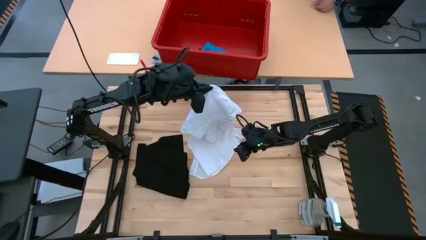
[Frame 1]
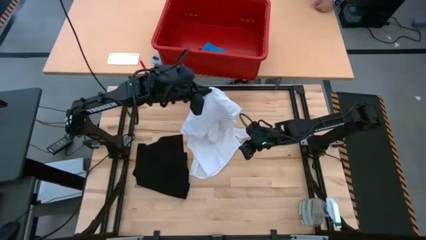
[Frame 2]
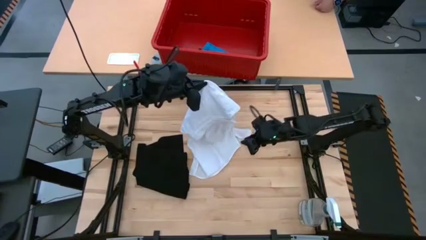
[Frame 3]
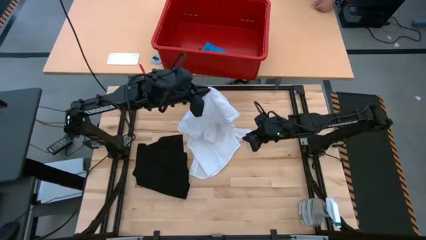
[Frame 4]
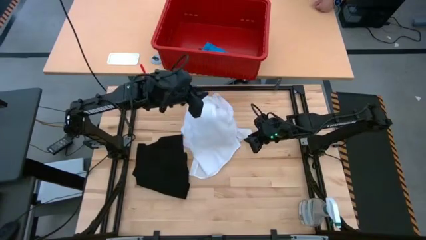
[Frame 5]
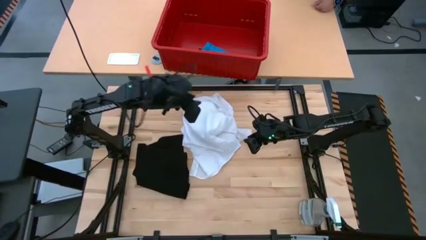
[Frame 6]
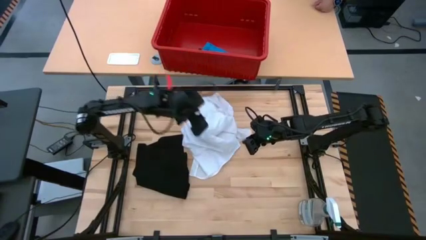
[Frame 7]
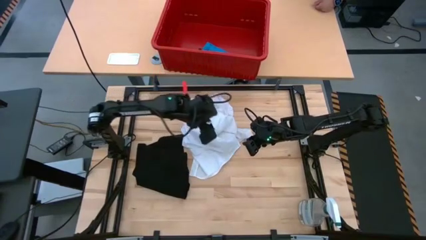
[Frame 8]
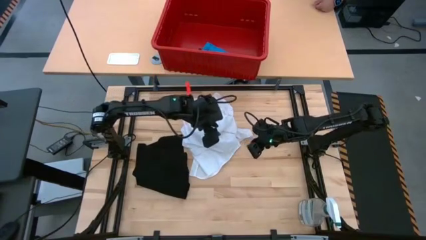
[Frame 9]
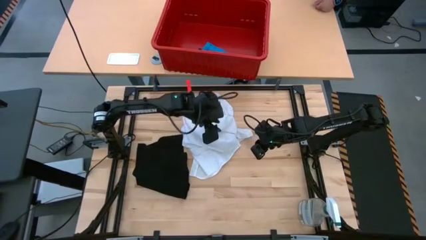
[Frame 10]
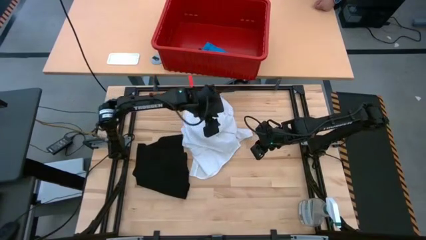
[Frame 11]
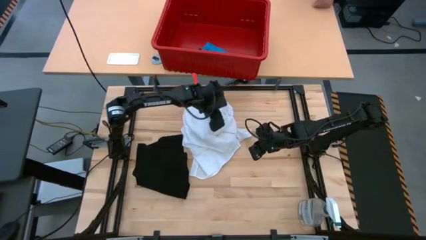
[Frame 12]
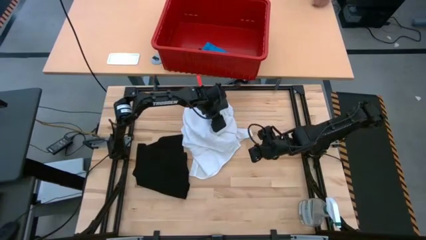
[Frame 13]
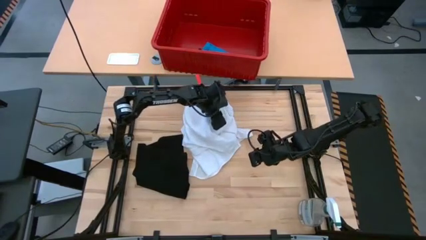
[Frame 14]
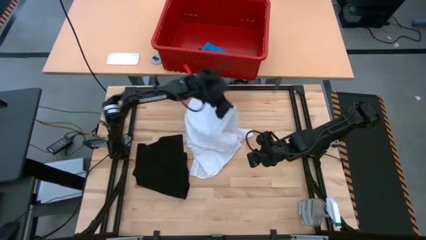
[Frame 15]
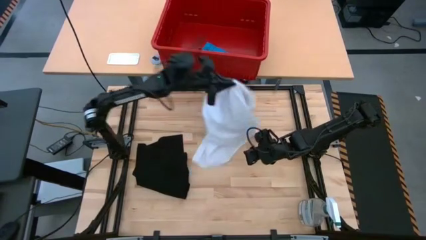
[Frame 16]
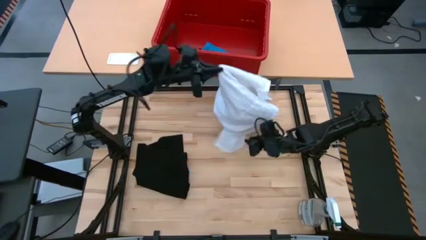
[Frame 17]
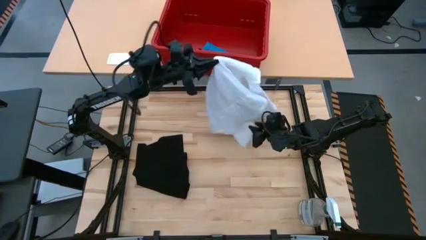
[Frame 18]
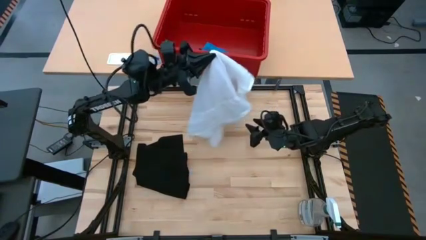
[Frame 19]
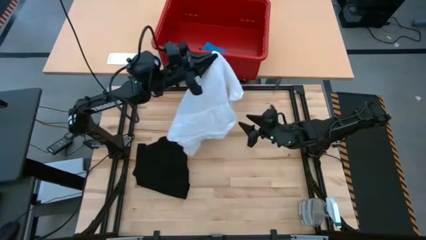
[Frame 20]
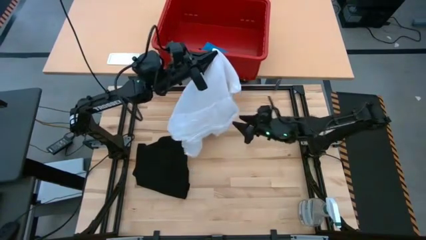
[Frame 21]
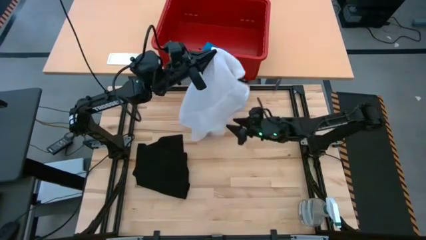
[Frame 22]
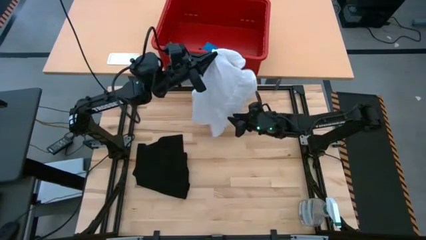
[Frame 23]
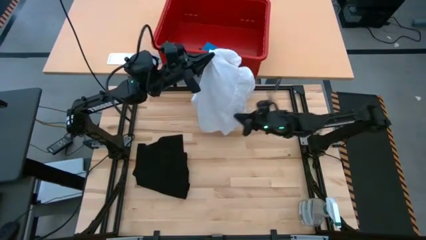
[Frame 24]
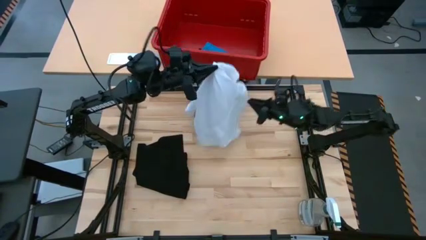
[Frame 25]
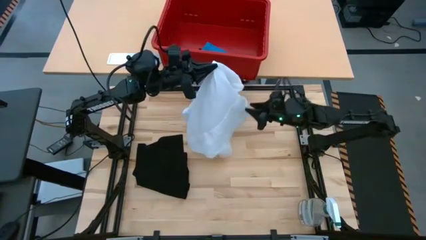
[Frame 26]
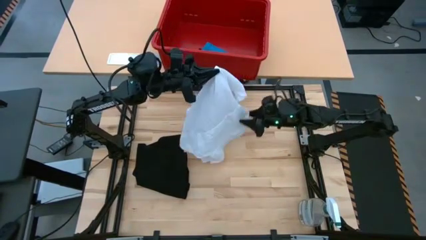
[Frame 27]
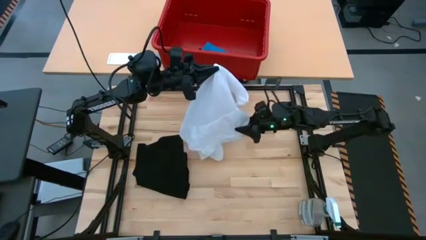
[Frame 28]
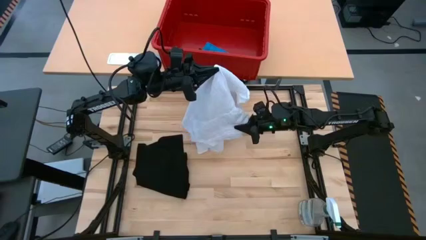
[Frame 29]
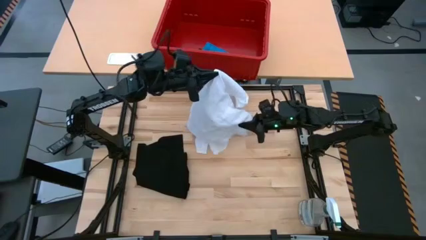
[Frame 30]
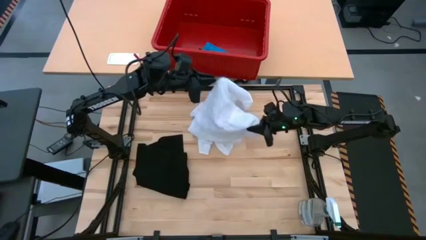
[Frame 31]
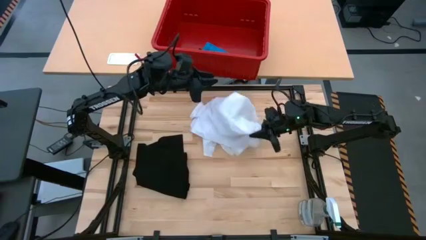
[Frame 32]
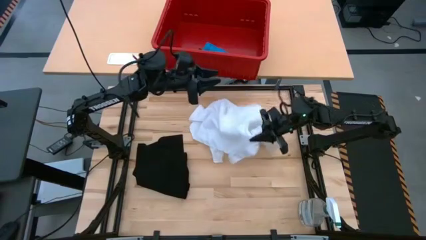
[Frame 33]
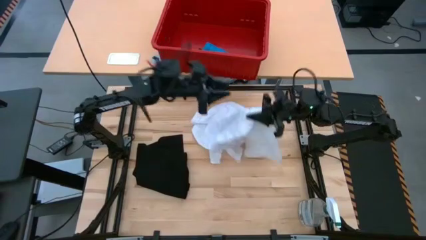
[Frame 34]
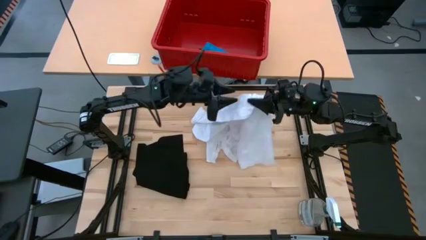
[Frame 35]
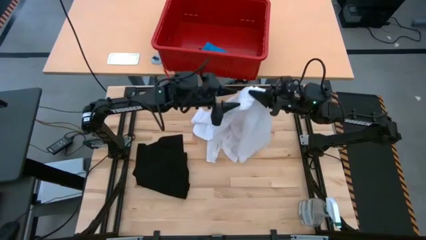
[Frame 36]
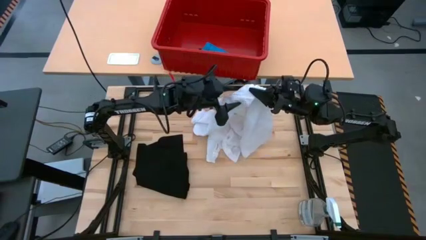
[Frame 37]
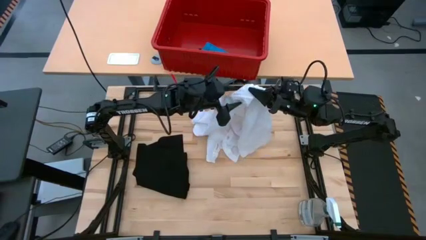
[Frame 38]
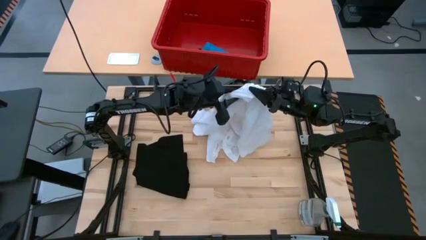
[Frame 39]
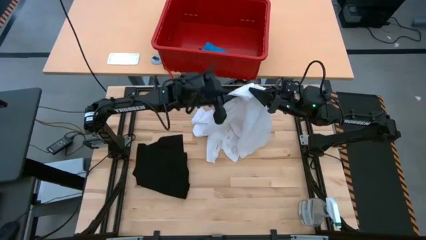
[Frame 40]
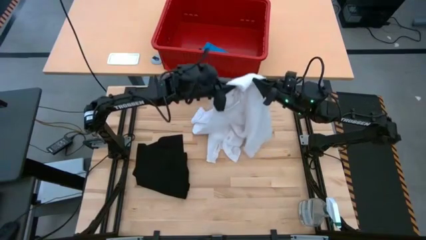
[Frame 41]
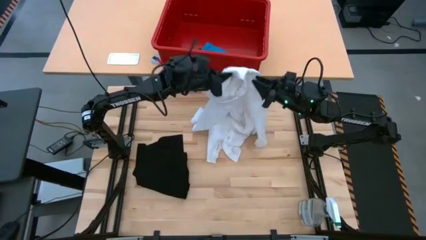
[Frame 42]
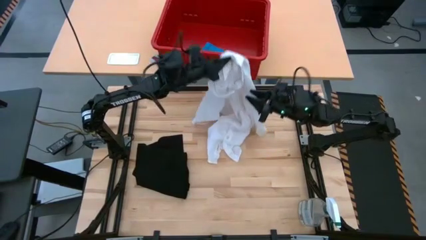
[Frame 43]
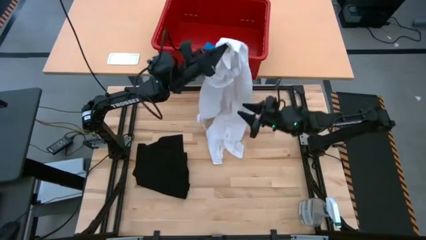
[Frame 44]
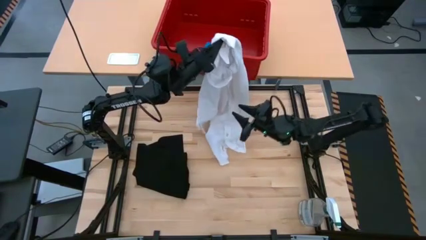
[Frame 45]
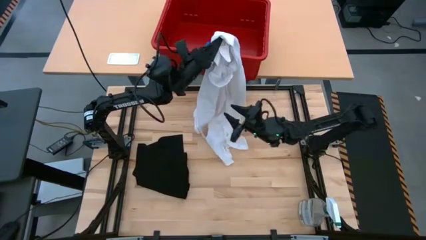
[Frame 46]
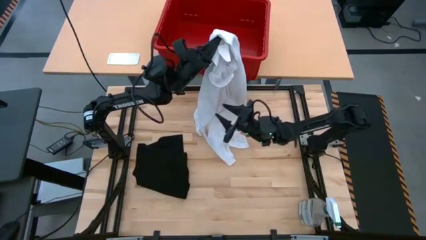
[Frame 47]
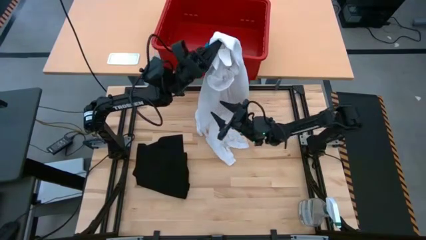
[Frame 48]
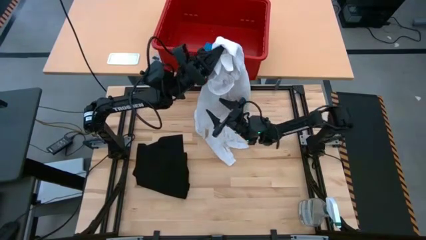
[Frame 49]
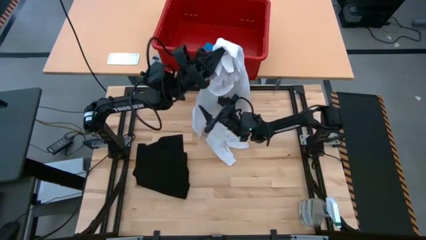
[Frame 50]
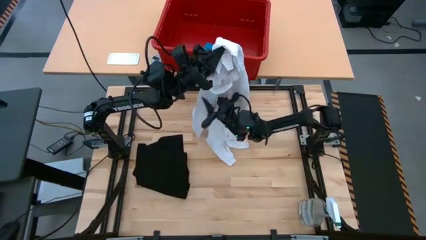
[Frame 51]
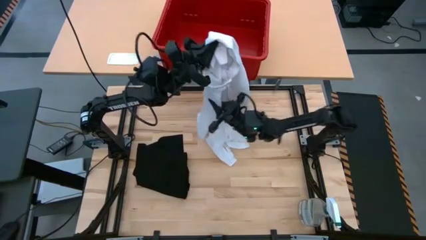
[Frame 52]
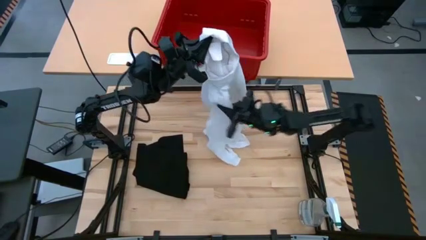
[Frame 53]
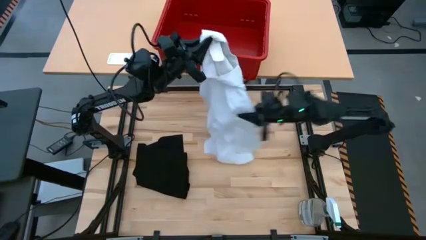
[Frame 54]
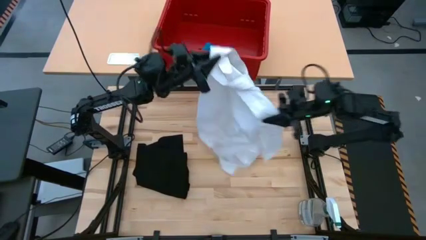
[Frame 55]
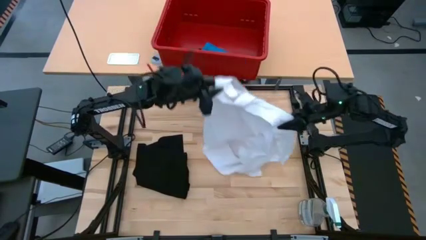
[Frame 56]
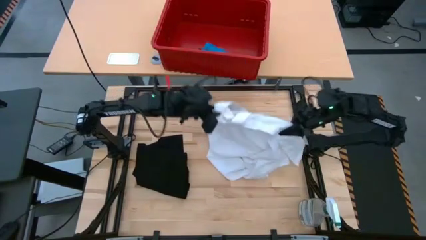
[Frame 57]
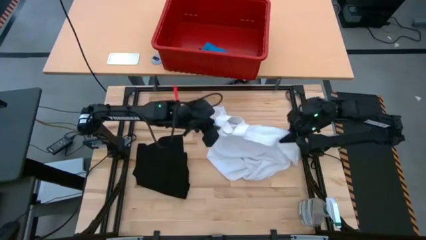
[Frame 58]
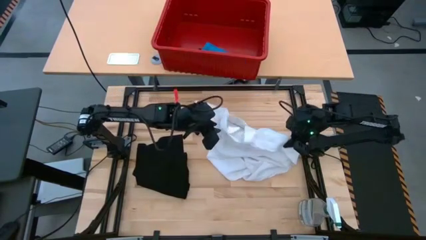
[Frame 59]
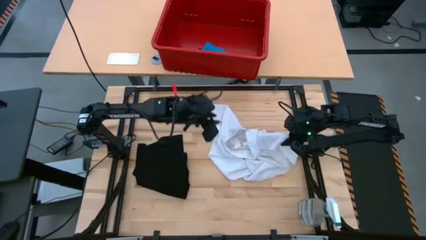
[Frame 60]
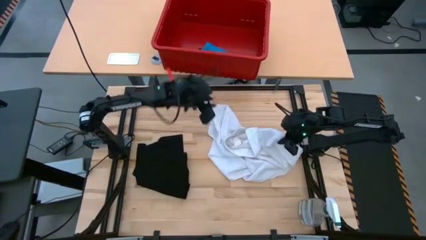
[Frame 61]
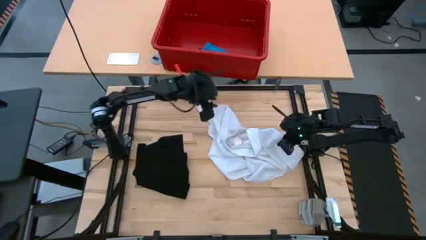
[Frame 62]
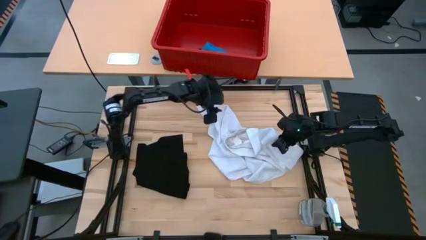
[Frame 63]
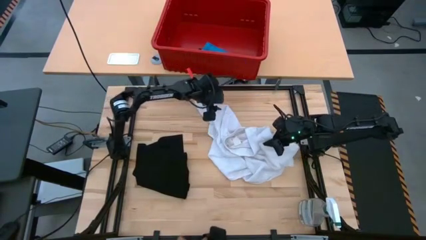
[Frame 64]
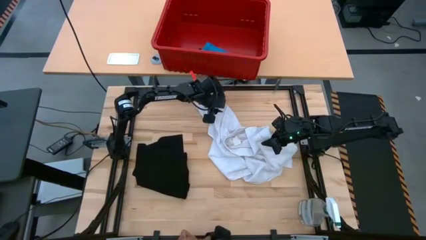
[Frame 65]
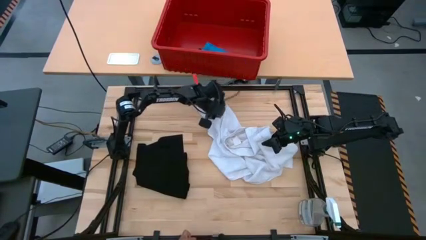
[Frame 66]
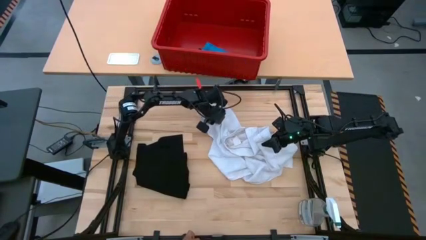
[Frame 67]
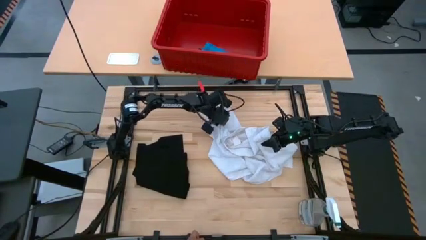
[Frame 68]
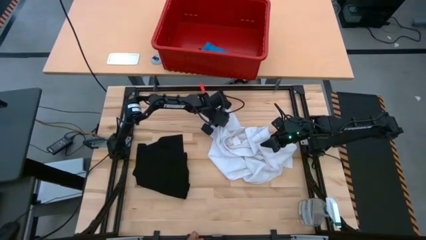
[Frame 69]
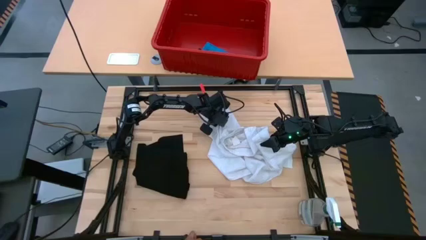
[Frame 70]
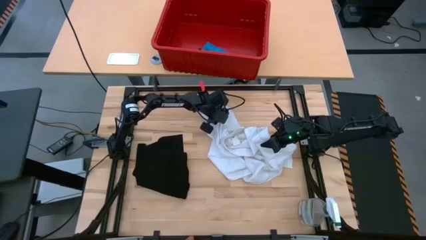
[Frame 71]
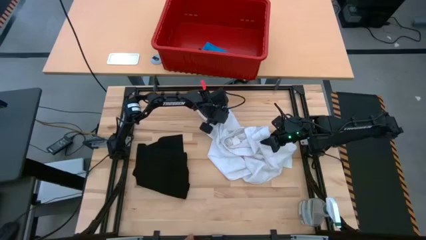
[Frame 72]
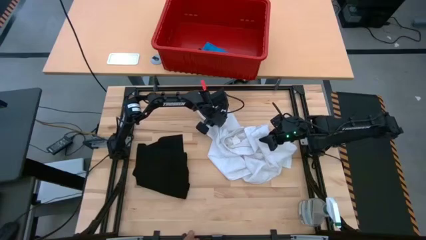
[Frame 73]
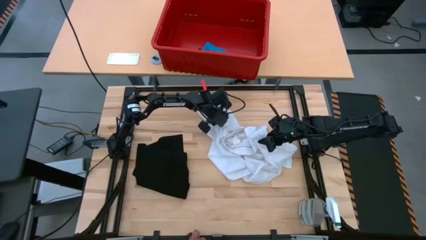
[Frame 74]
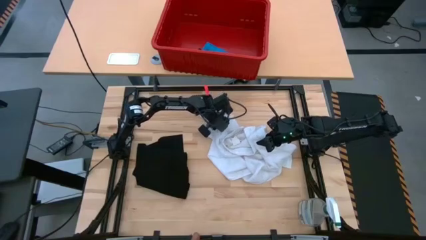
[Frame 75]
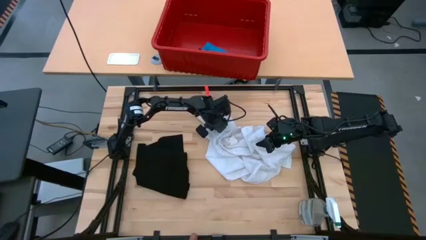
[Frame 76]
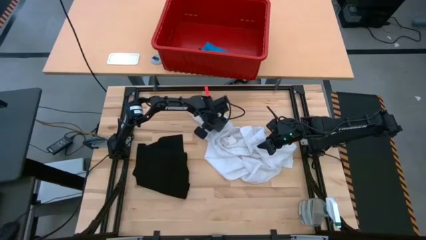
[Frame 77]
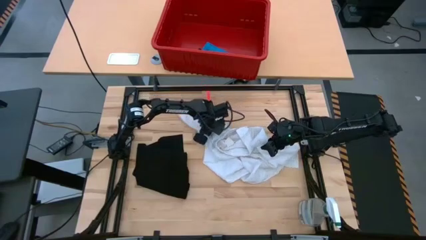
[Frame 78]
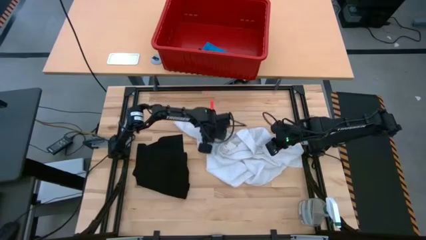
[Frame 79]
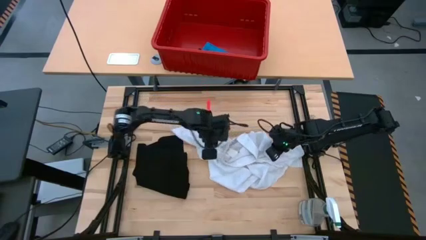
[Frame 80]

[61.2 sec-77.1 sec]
Task: Fold laundry
Fold the white shirt
